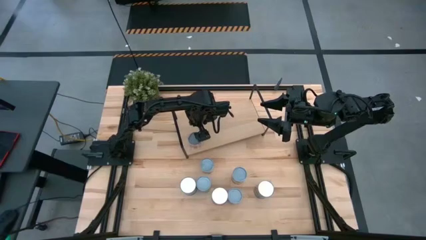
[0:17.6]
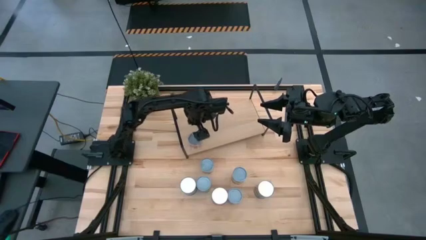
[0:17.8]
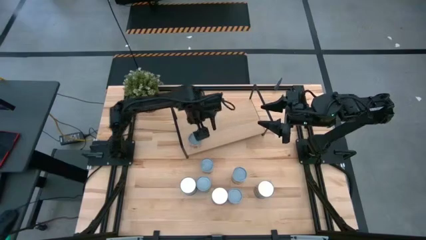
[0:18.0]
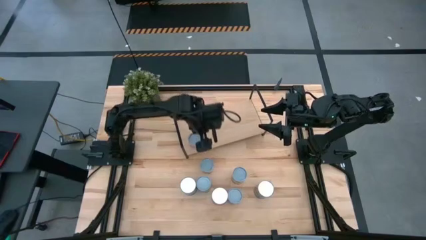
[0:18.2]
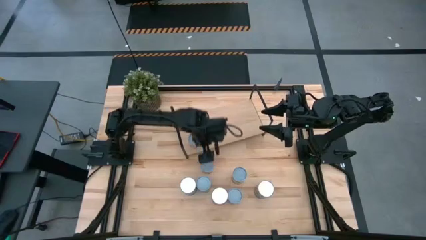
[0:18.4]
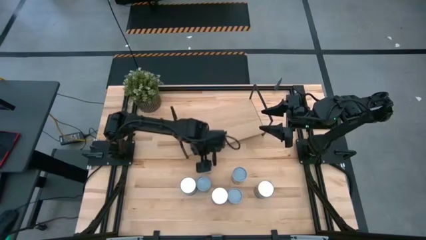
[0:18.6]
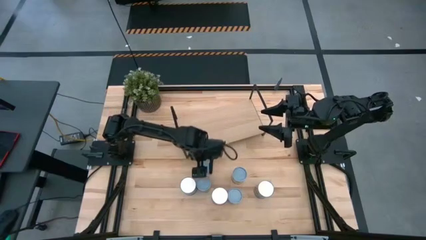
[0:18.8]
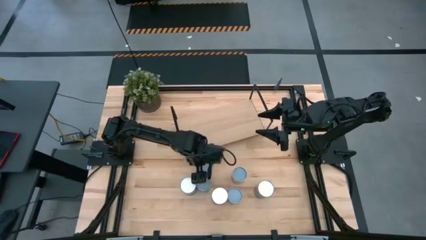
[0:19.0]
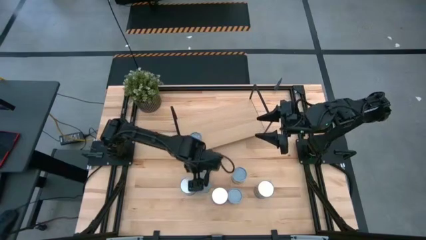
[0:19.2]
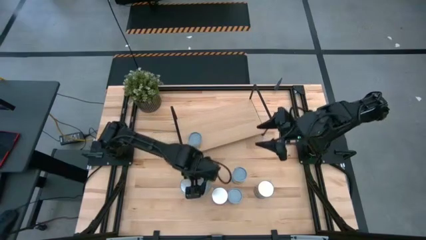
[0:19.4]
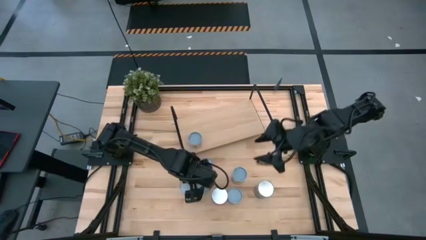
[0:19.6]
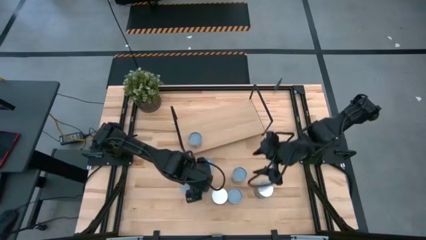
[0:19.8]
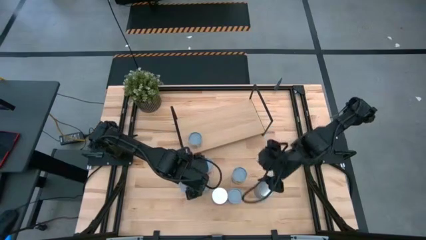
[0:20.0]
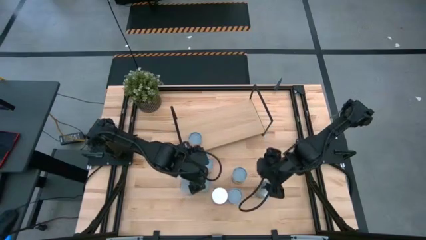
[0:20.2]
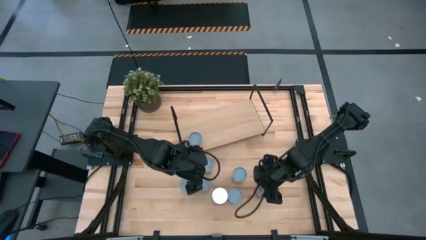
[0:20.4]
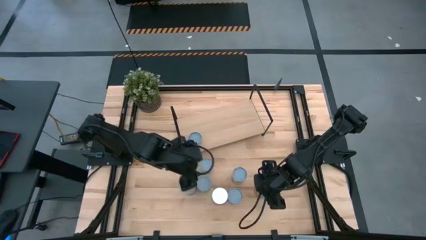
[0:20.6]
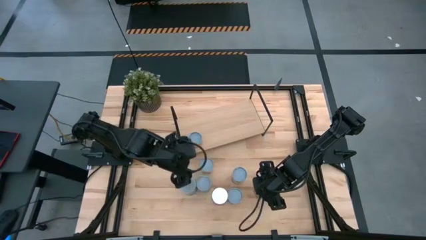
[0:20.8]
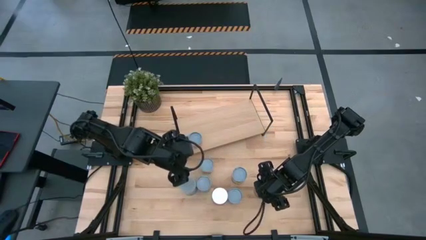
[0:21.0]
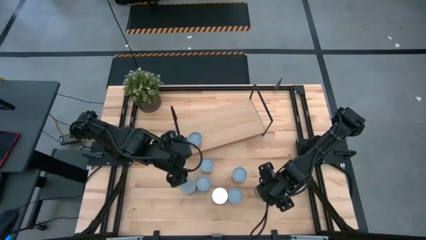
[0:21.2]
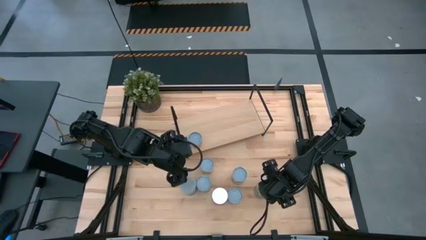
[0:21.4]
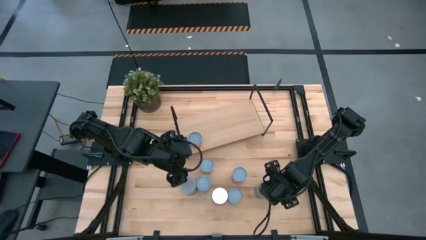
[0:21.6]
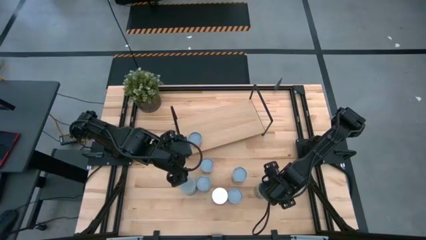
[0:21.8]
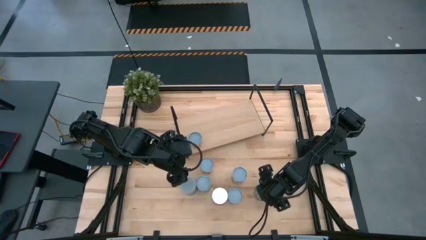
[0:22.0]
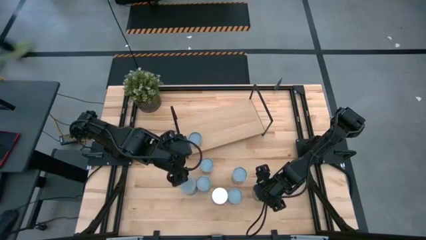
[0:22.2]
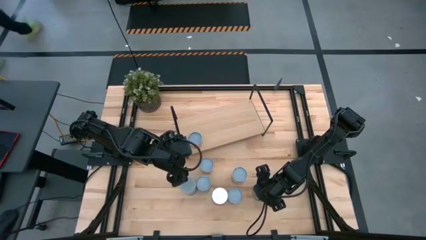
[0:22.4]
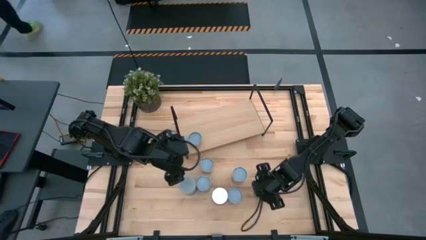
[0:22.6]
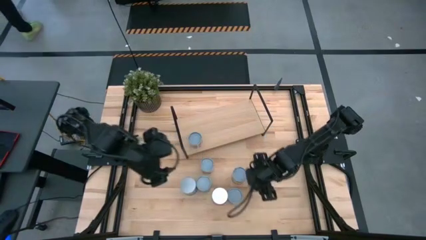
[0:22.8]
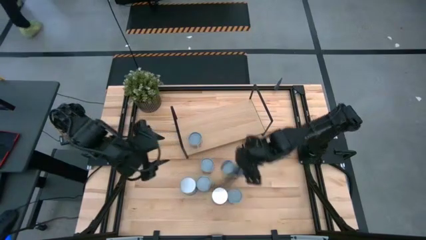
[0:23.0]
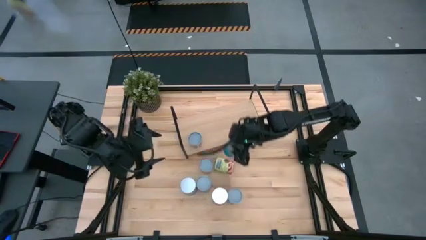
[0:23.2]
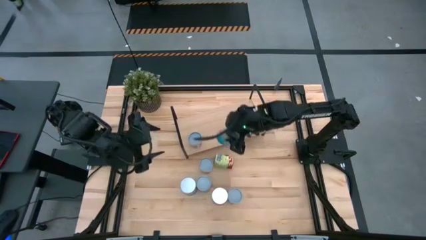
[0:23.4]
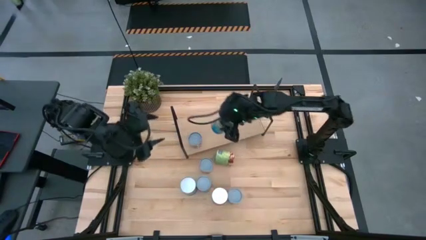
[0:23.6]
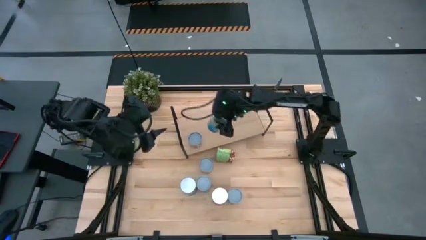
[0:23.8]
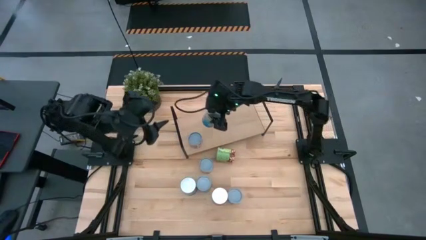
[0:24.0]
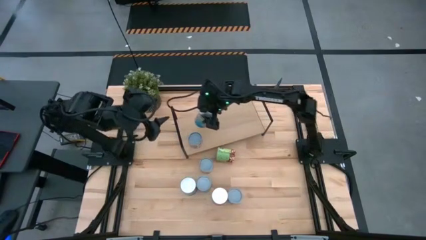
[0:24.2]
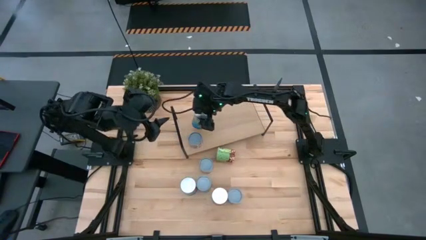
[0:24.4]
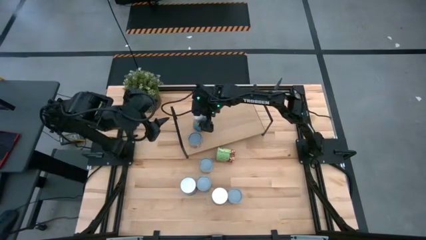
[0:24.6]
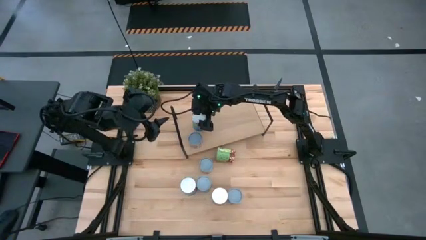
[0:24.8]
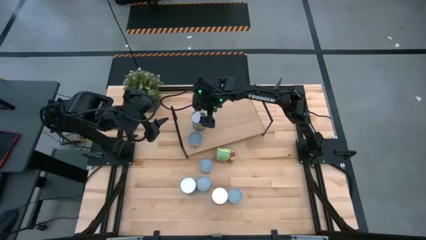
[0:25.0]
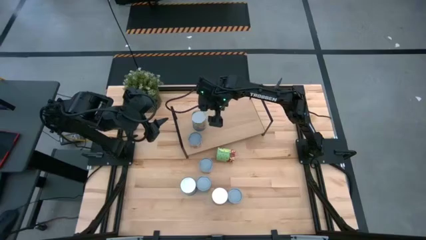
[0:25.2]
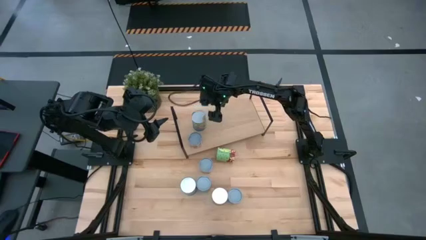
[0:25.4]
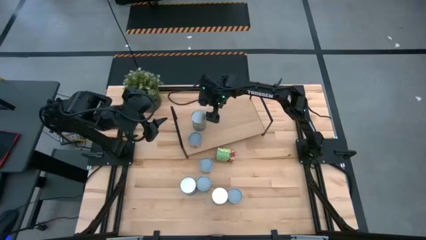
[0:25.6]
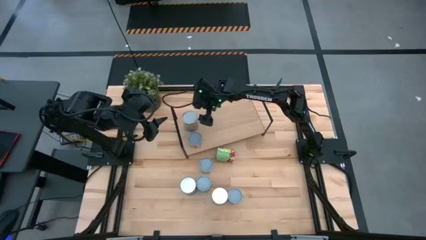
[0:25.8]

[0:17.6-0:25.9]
Task: Pick and place cans onto a shelf
Put the canned tomatoes on the shelf

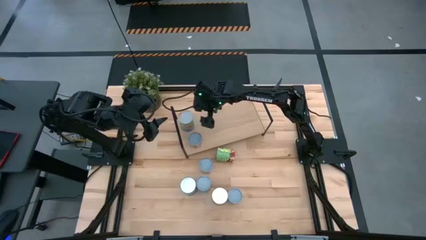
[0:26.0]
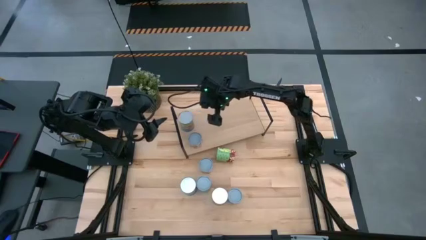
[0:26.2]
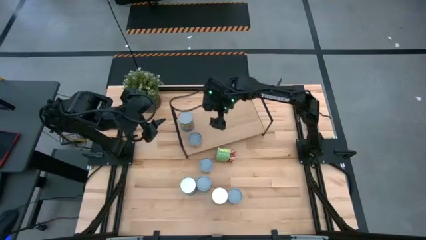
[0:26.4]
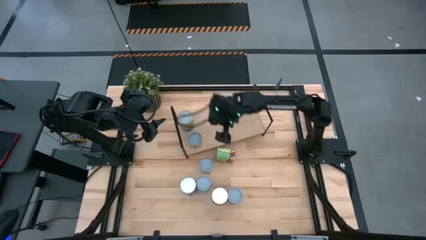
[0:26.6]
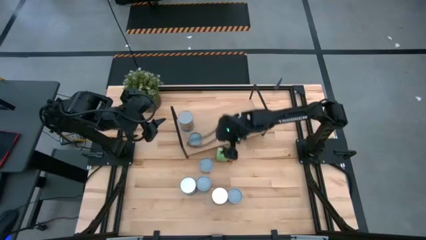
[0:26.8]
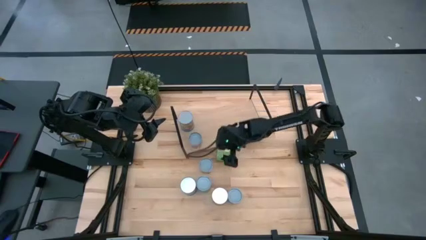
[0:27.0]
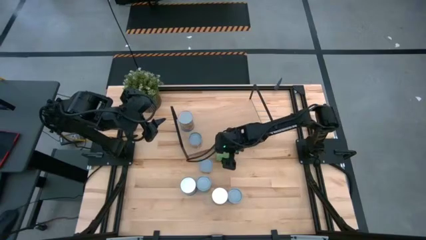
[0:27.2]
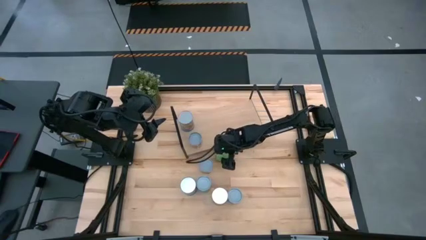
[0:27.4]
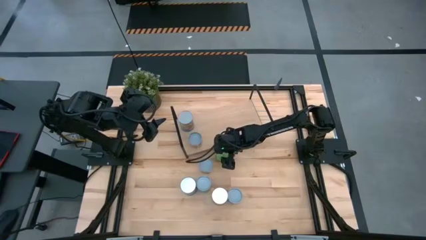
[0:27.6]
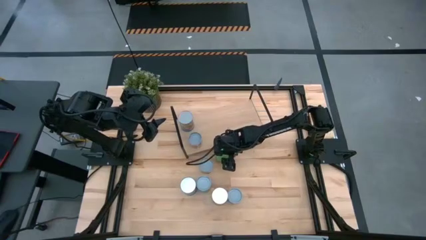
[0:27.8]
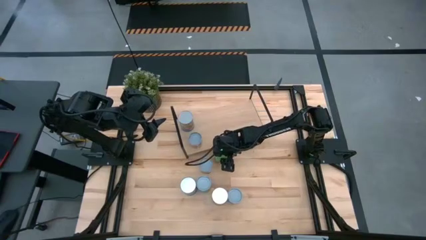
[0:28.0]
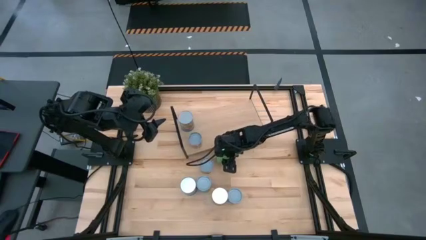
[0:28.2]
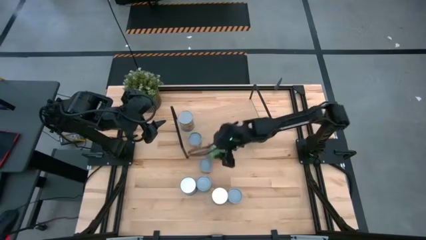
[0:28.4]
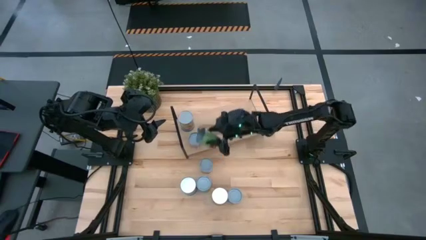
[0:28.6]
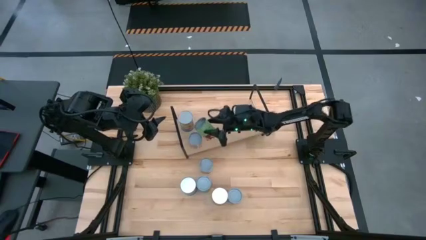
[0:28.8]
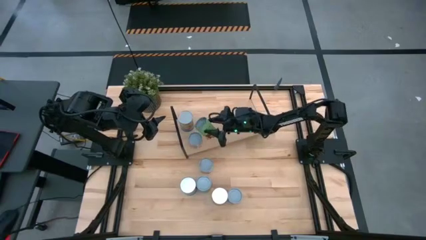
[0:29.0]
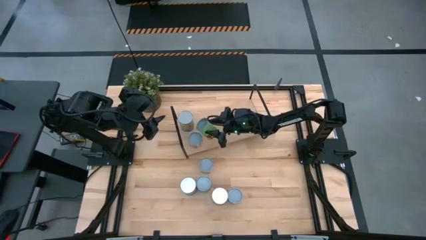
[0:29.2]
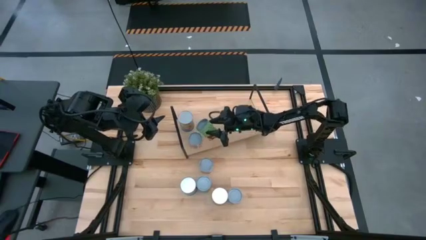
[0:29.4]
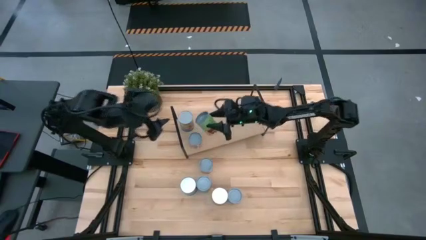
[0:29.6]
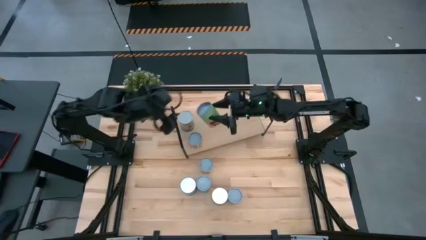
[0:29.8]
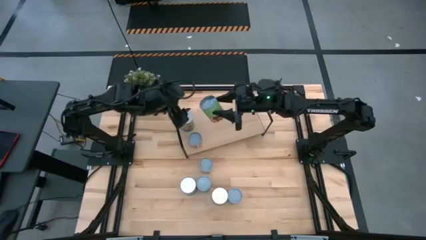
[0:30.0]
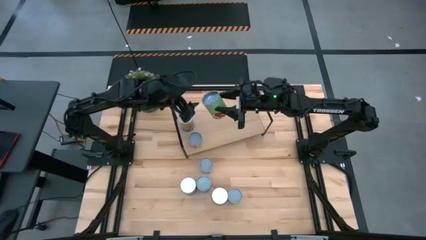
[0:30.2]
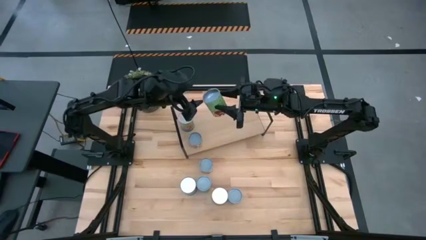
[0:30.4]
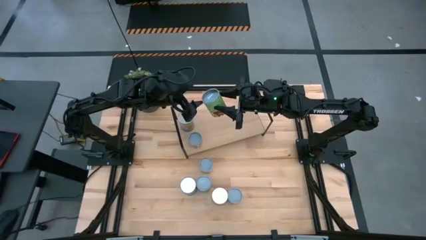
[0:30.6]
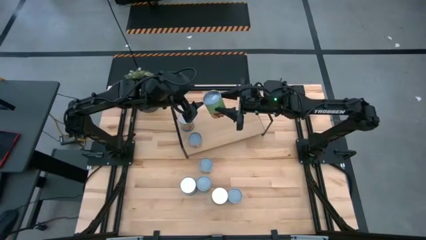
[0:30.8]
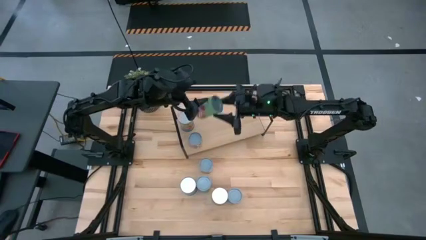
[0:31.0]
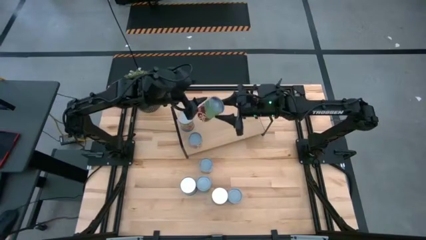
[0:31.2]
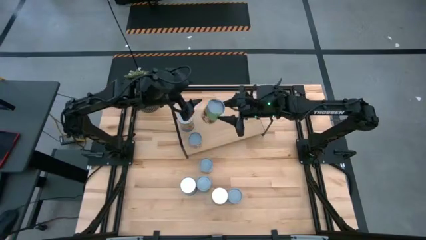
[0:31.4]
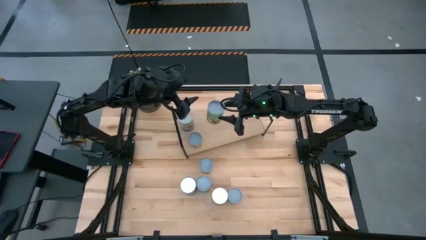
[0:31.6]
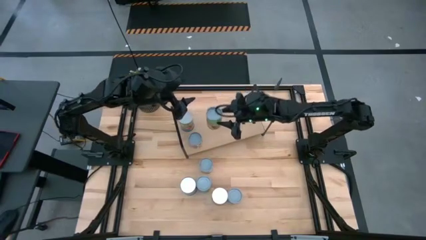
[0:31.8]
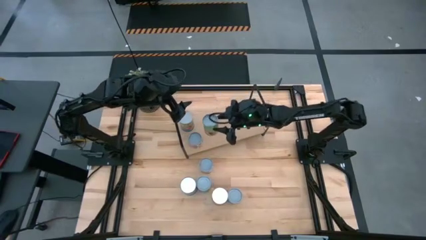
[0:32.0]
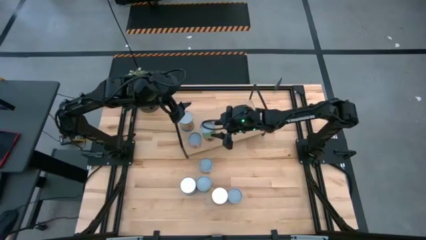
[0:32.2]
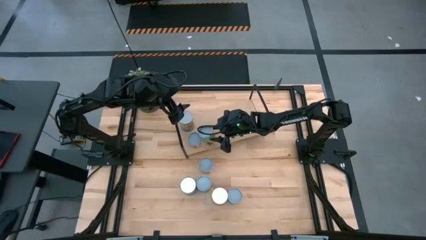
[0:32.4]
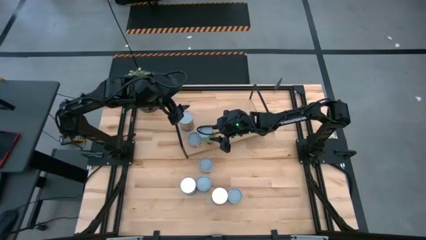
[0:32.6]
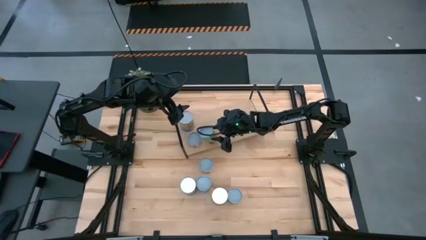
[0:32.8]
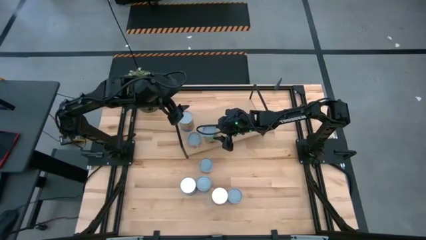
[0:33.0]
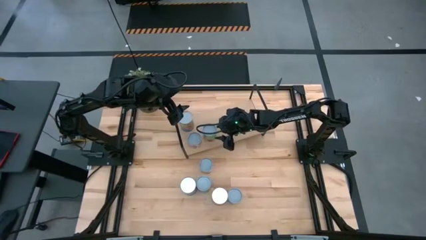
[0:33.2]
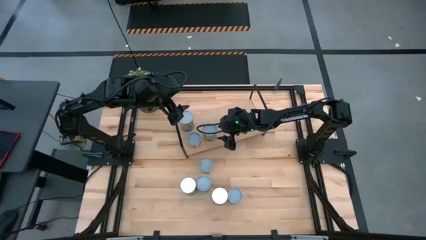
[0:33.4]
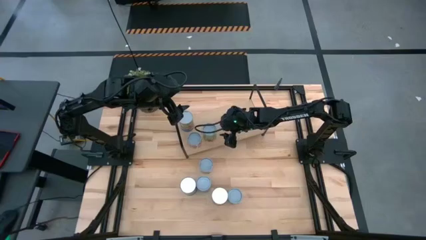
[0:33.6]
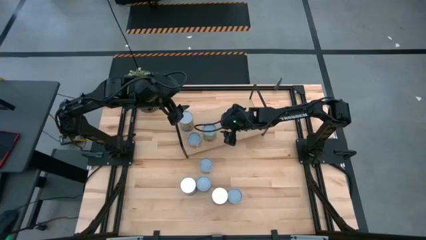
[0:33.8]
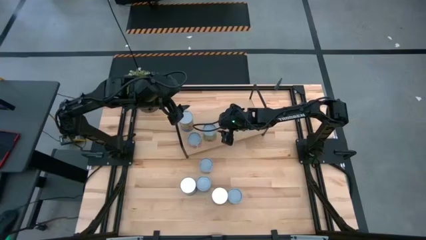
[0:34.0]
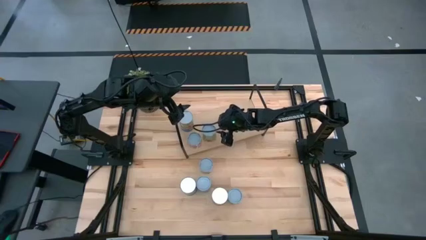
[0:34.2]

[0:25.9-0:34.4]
Put the canned spaghetti on the shelf
